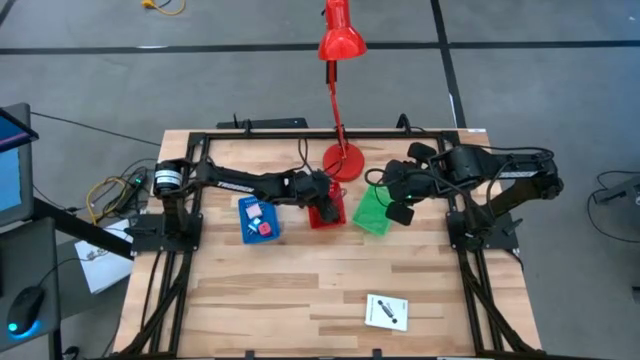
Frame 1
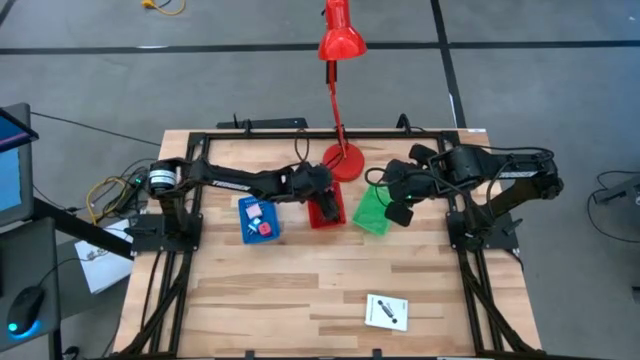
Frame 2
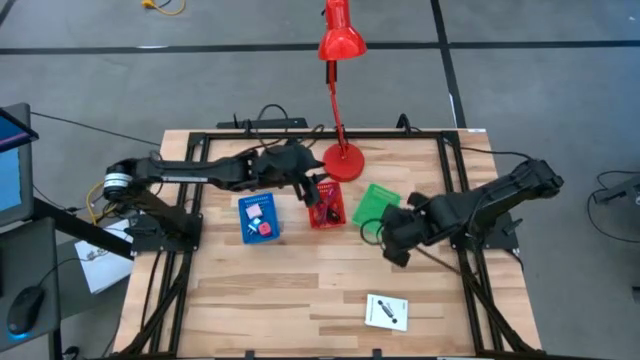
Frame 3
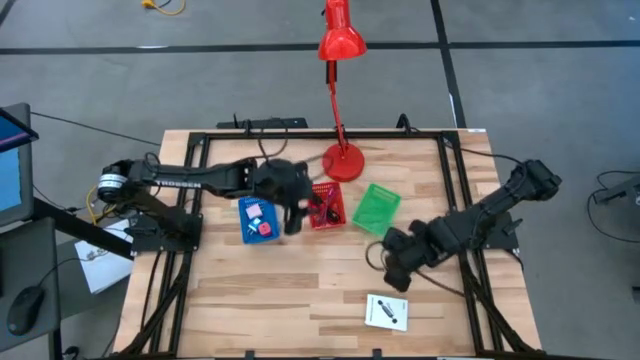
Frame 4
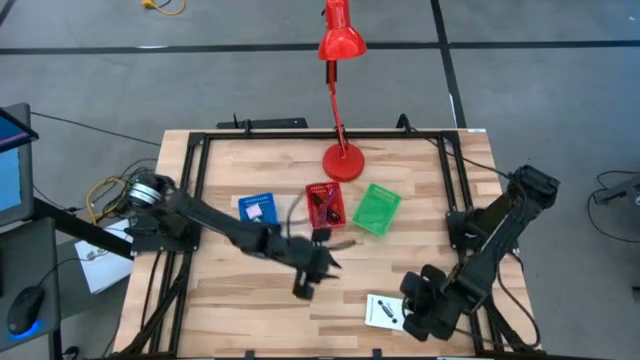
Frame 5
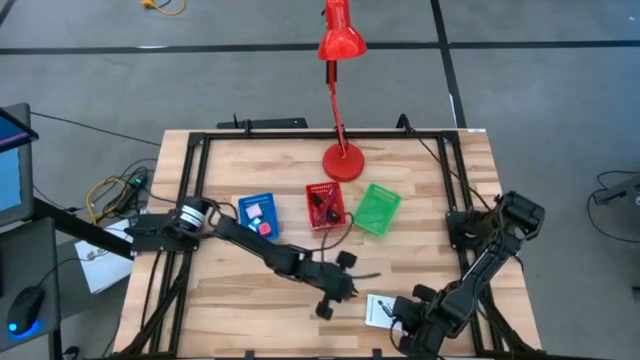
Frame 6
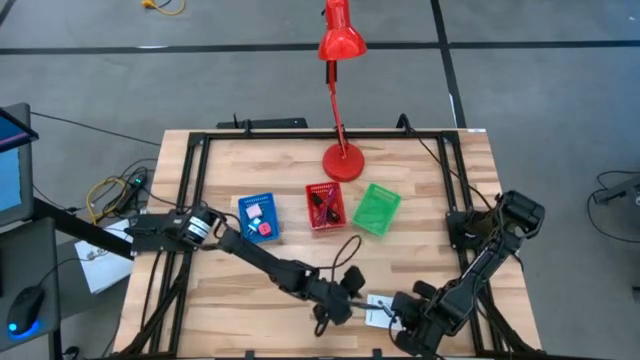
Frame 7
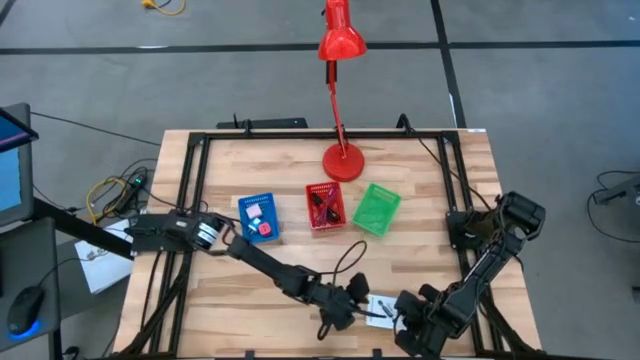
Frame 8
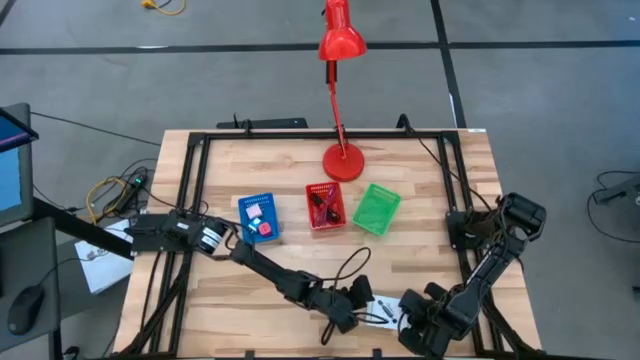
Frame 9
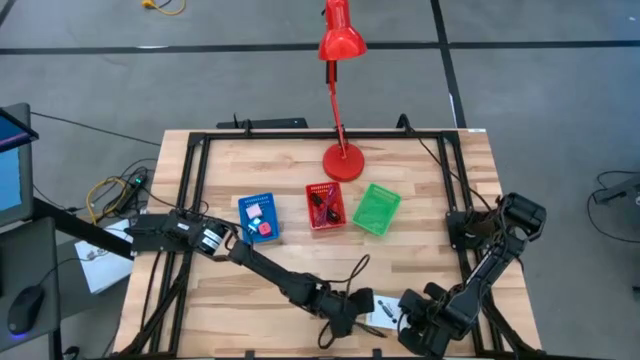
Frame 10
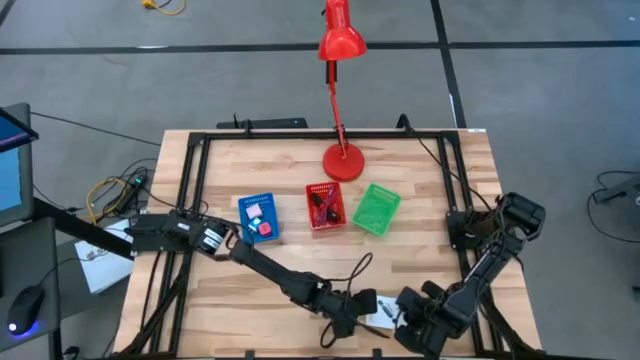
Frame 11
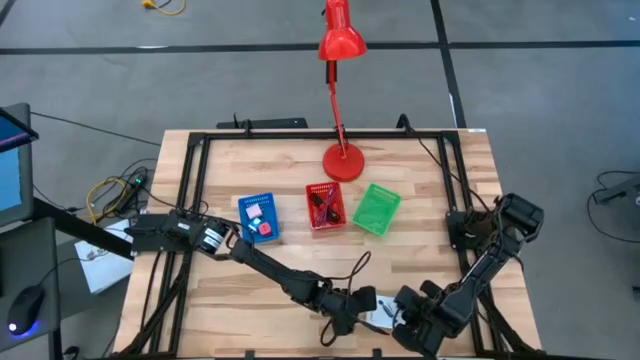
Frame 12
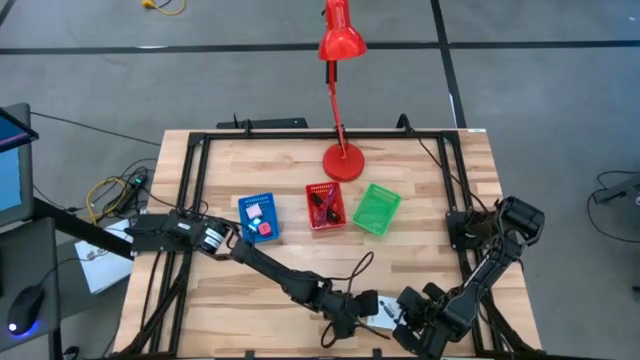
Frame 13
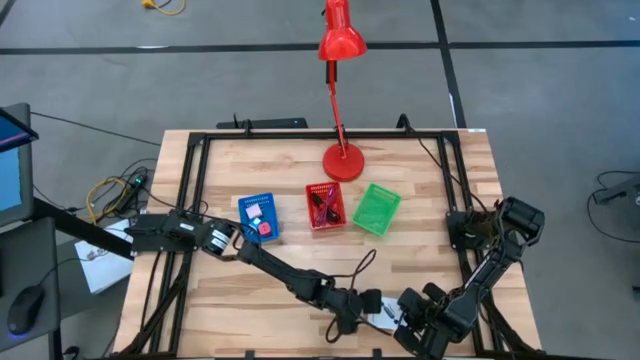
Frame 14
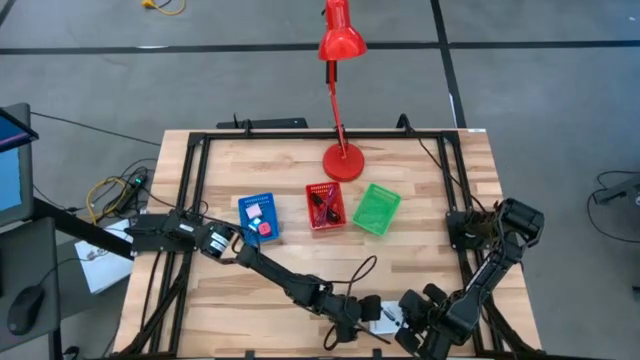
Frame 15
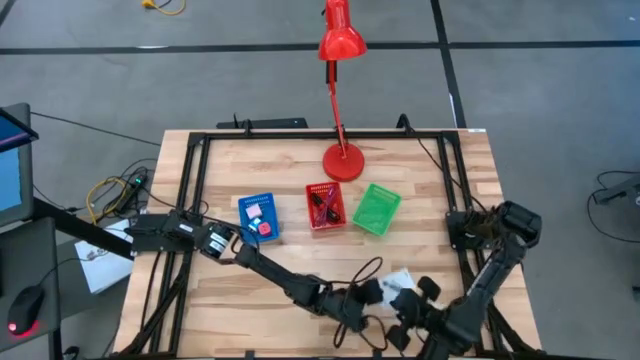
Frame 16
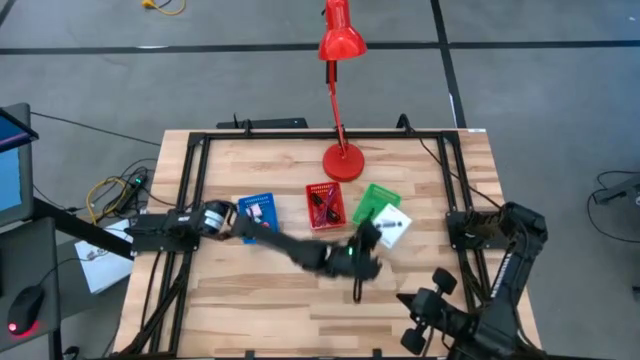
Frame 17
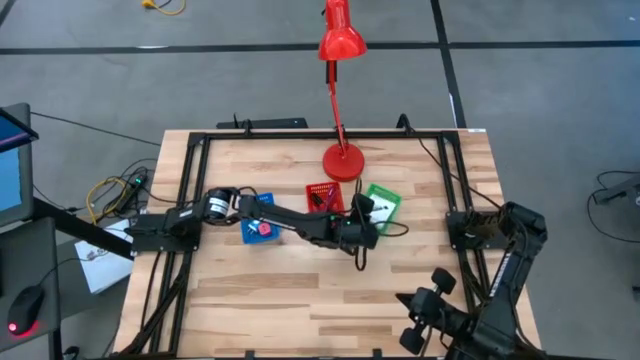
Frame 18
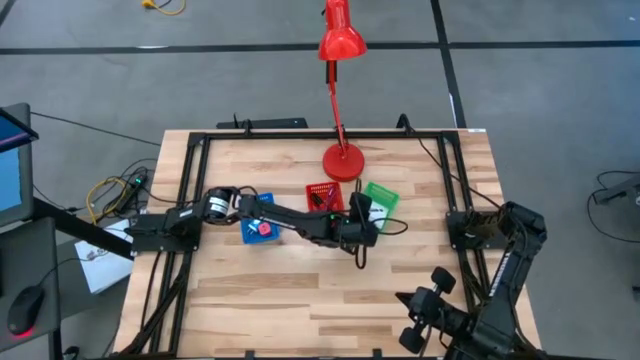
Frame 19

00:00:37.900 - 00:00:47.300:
Task: Pick and place items into bin
Put the white box into the green bin

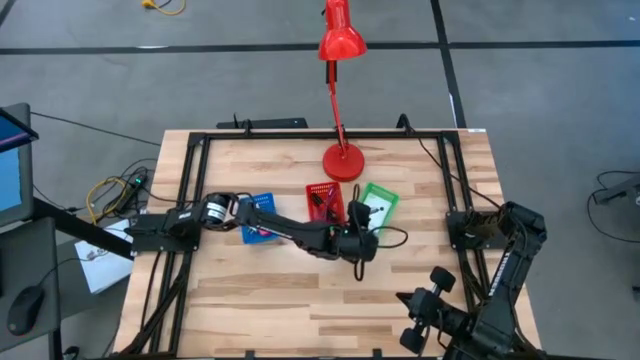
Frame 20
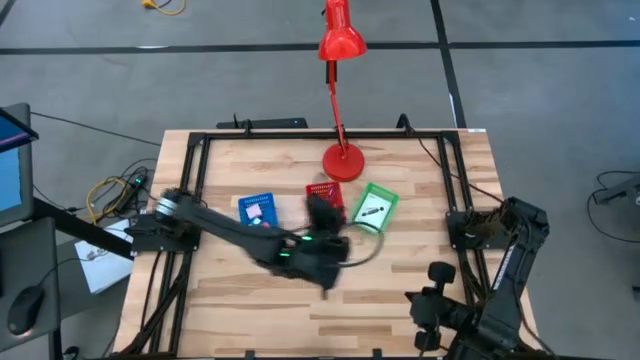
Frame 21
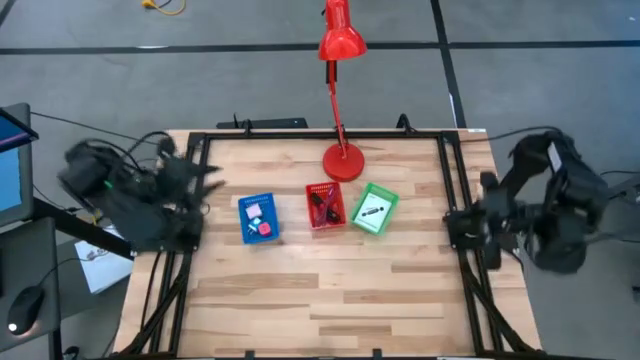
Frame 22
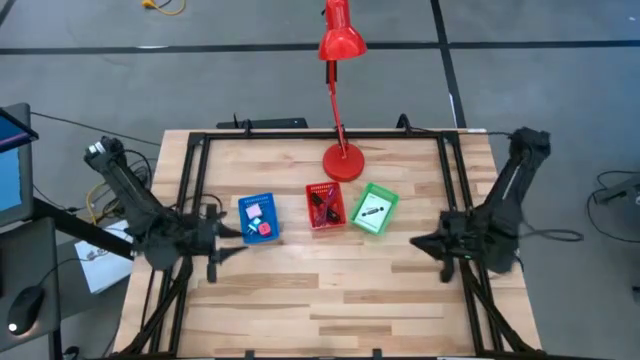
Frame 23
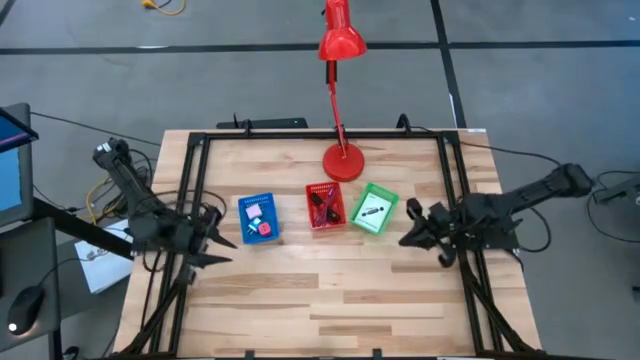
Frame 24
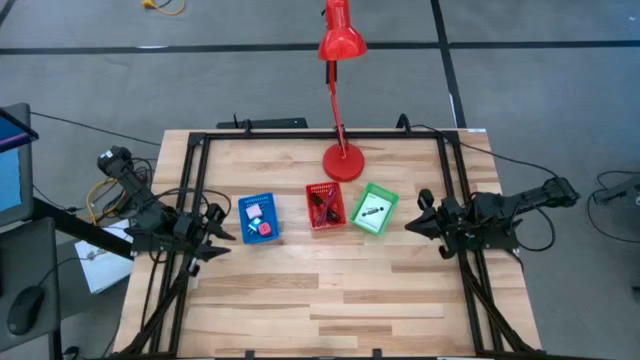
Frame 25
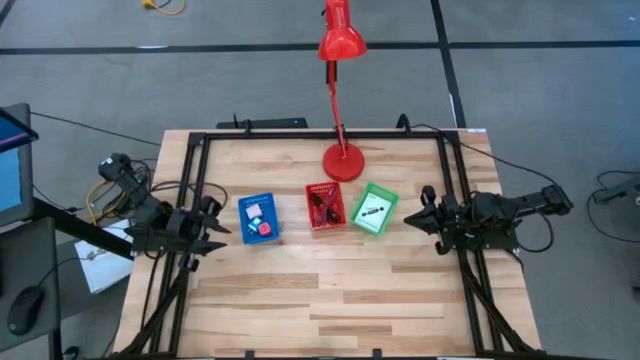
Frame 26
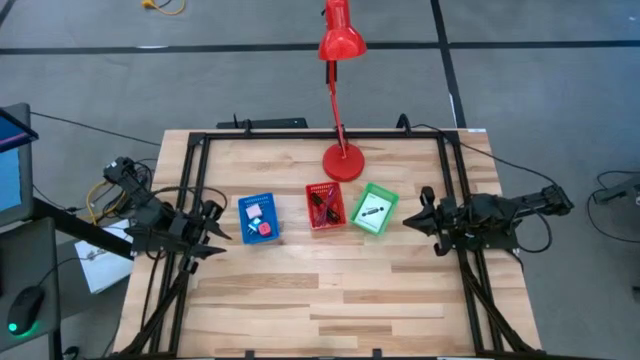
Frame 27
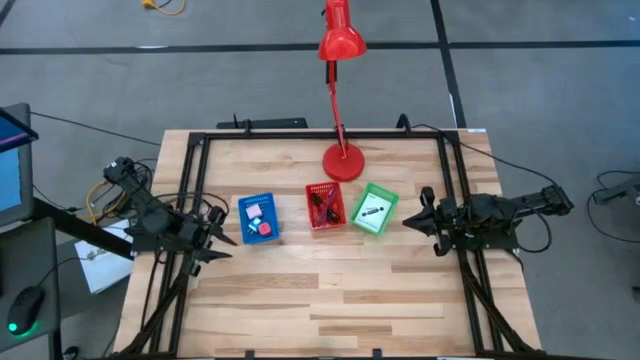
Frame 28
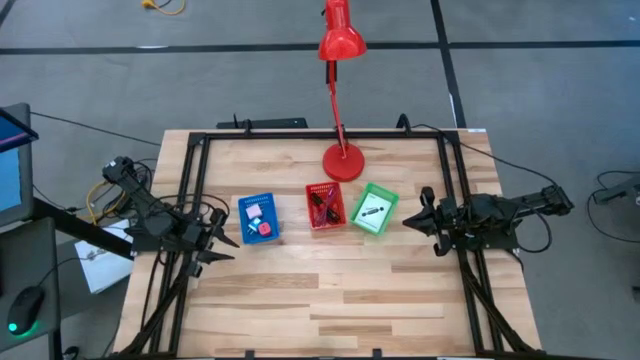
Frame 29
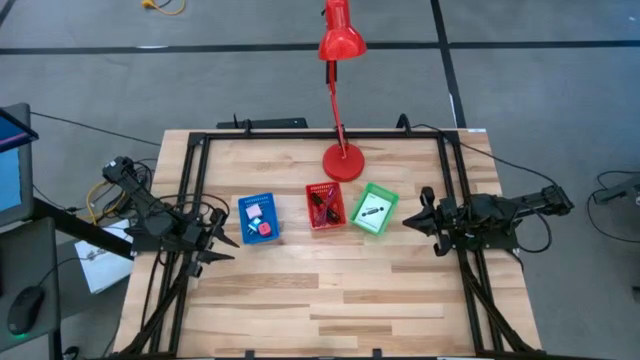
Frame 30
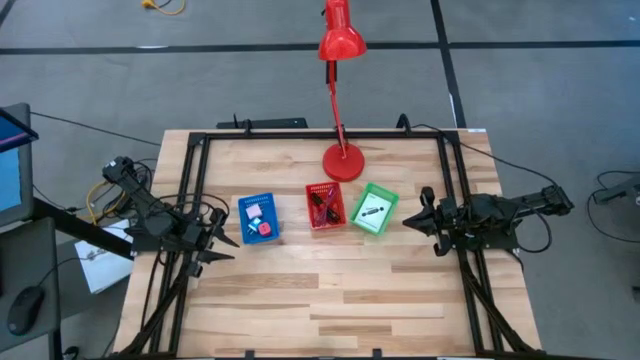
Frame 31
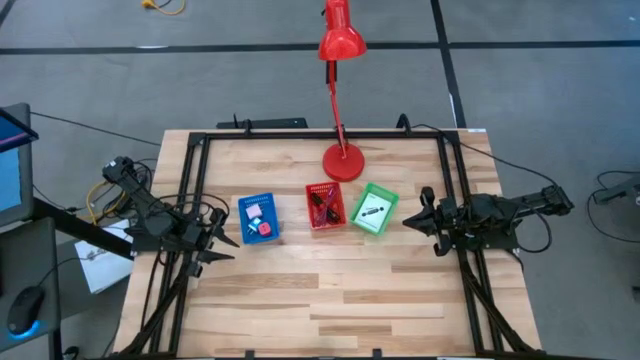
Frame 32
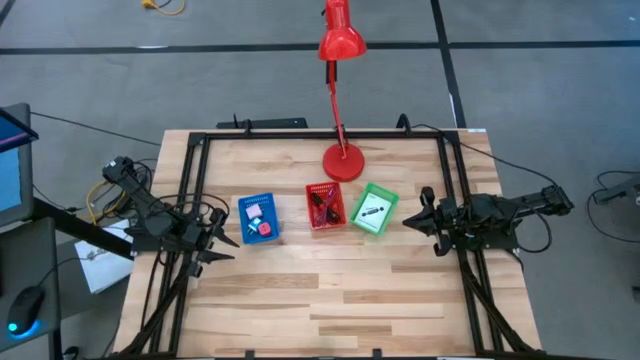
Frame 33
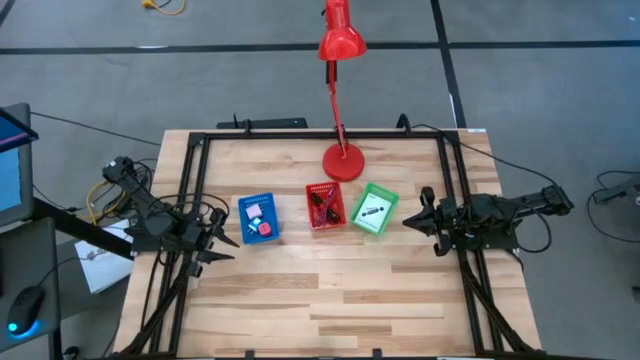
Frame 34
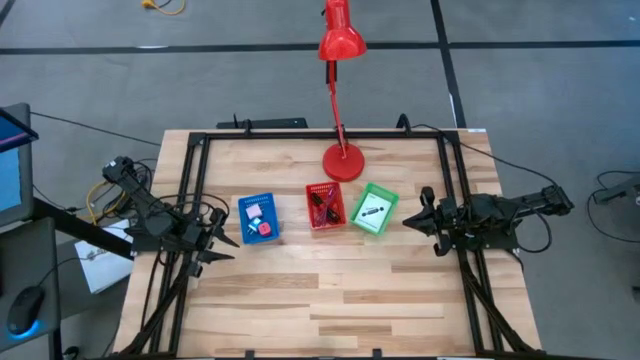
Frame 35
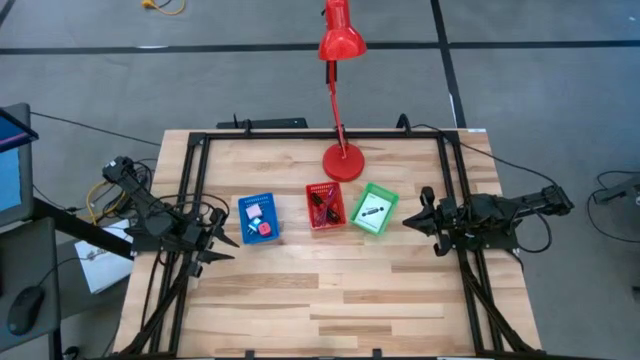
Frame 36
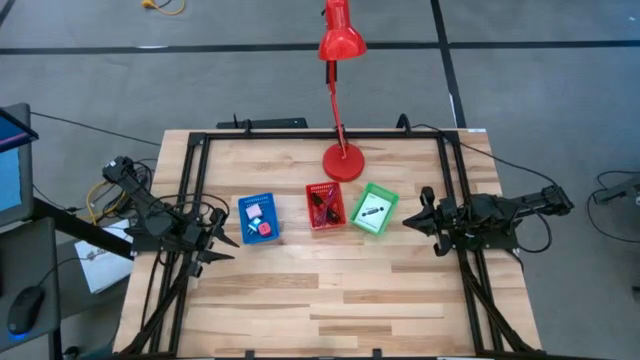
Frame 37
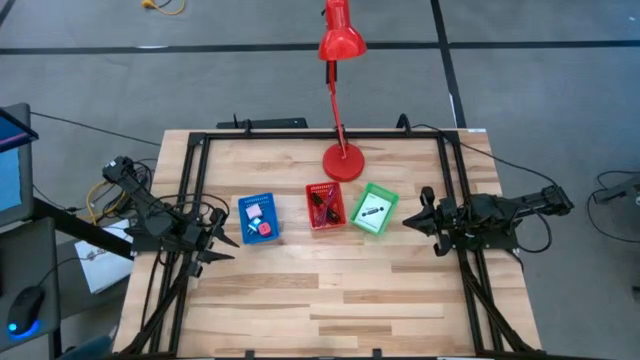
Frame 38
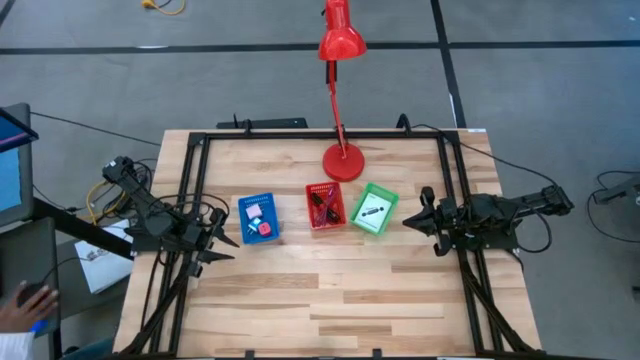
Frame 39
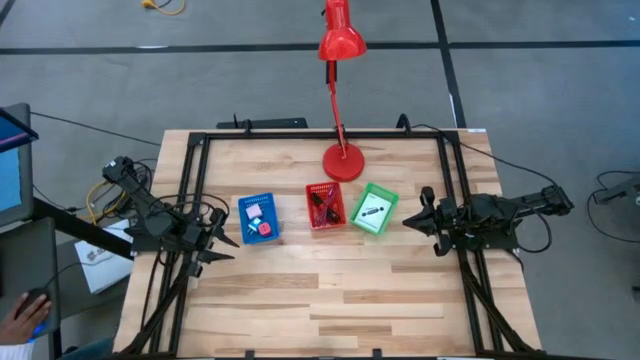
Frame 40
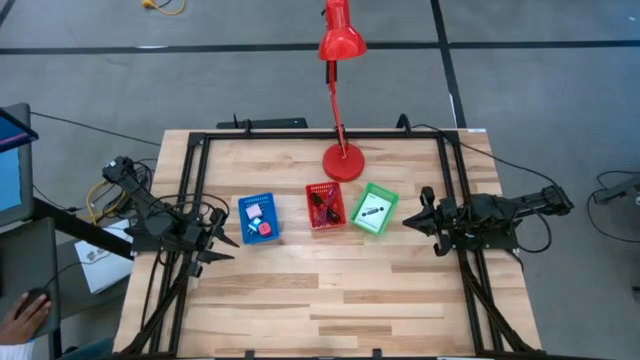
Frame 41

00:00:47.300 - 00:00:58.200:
Return to Home Position

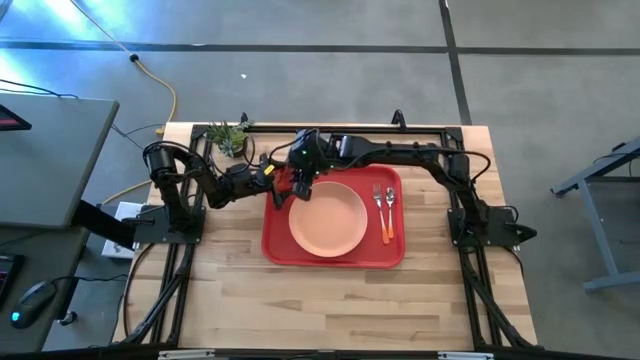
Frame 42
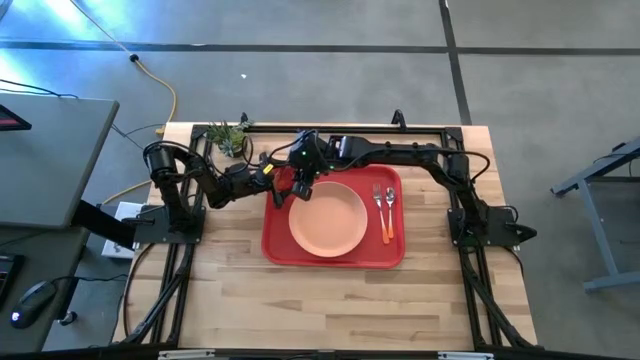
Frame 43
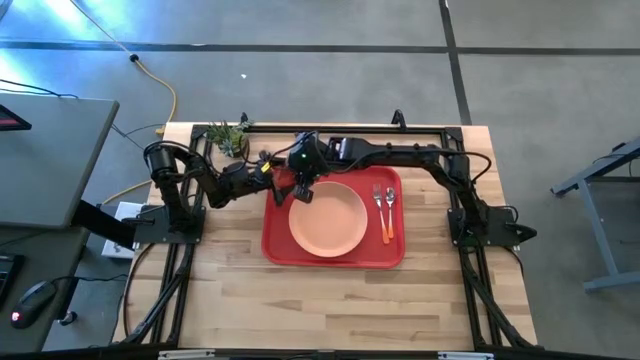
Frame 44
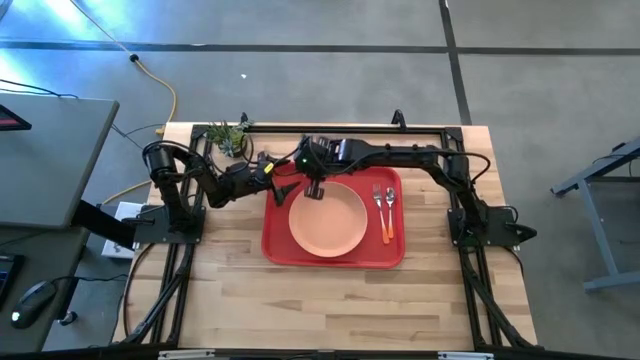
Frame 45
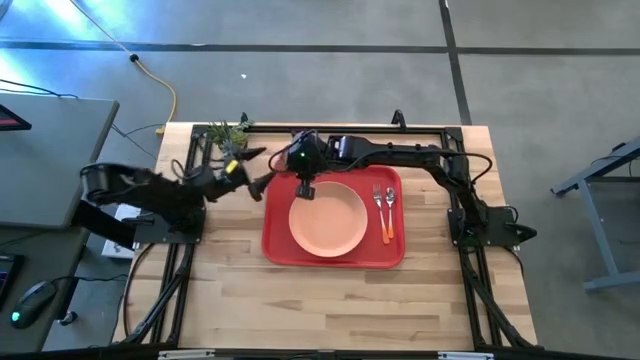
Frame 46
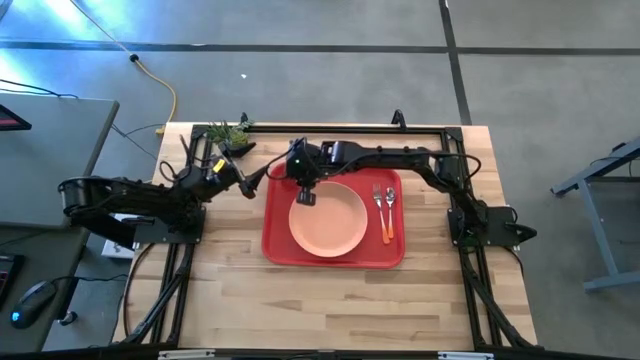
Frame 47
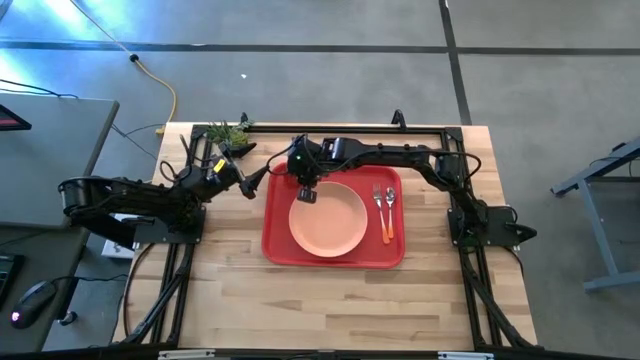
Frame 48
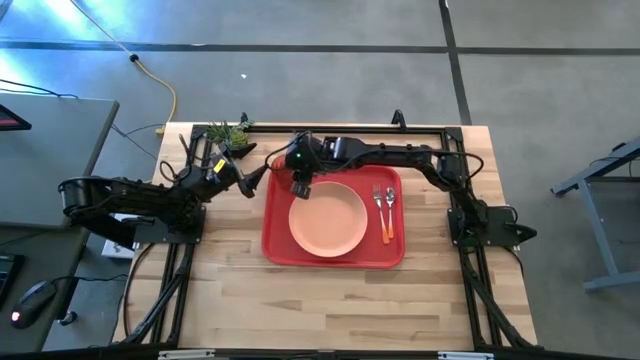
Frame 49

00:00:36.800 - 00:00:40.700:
Task: Pick and place plate/cup/fork/spoon on tray
Put the brown cup on the red tray
